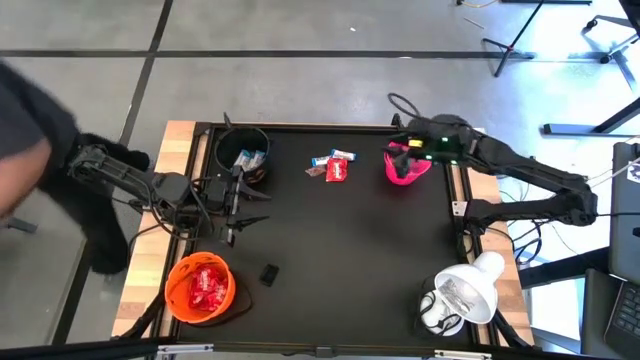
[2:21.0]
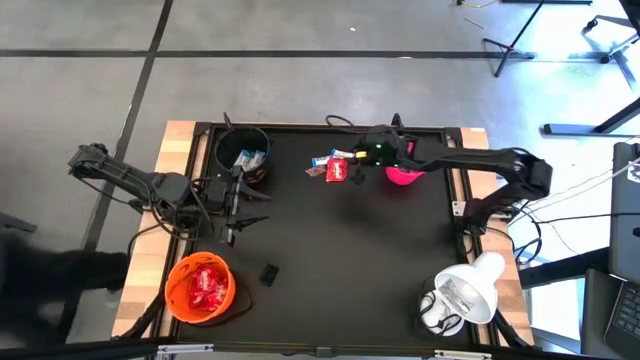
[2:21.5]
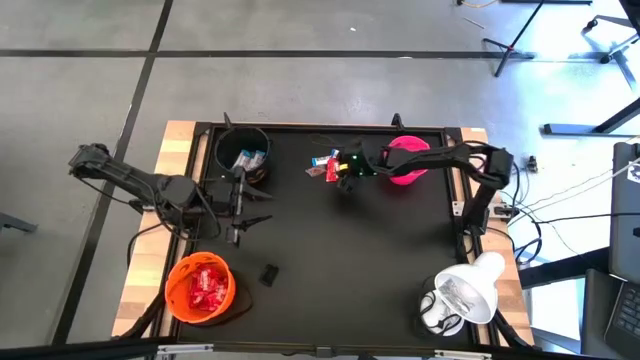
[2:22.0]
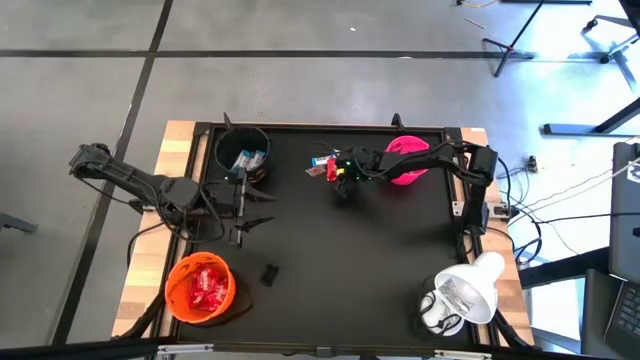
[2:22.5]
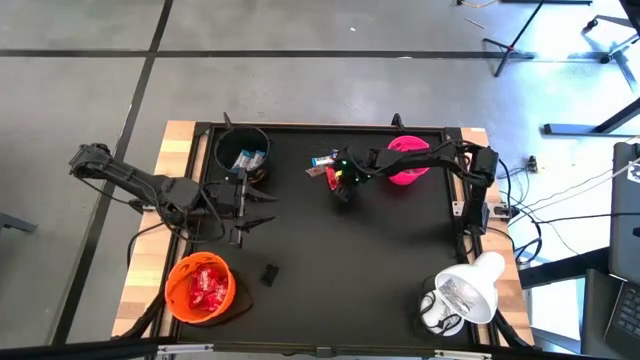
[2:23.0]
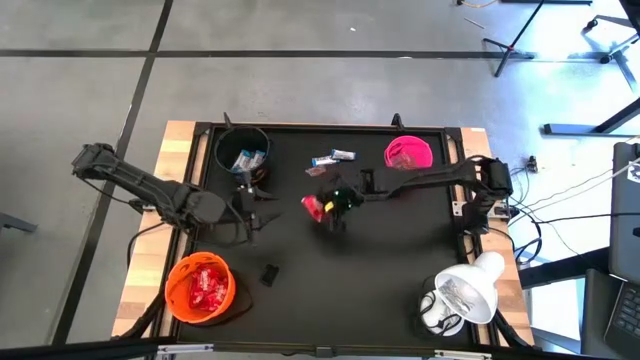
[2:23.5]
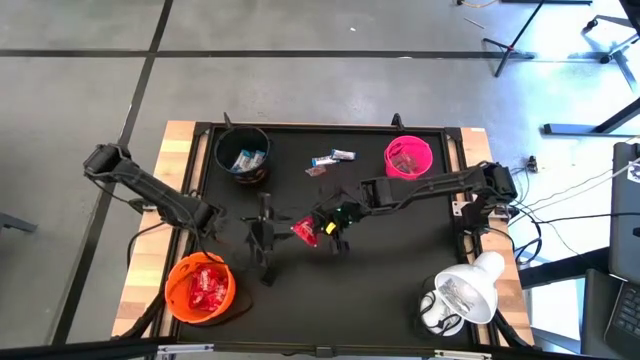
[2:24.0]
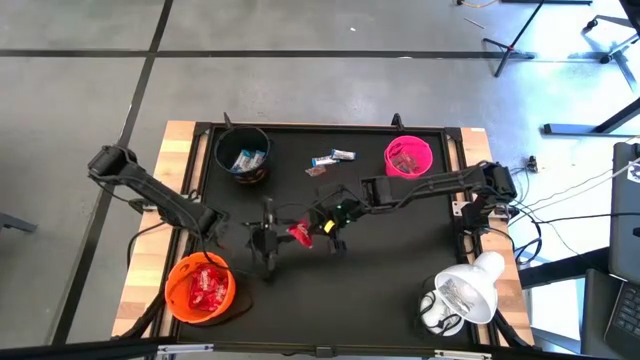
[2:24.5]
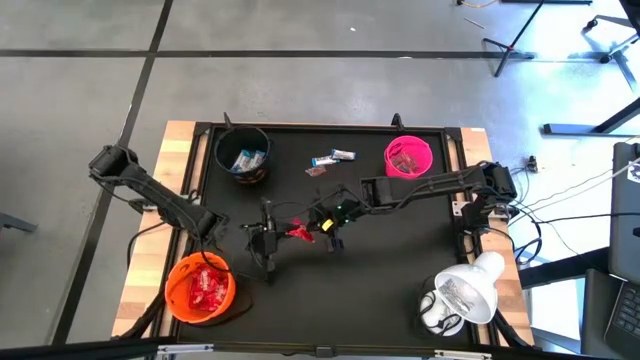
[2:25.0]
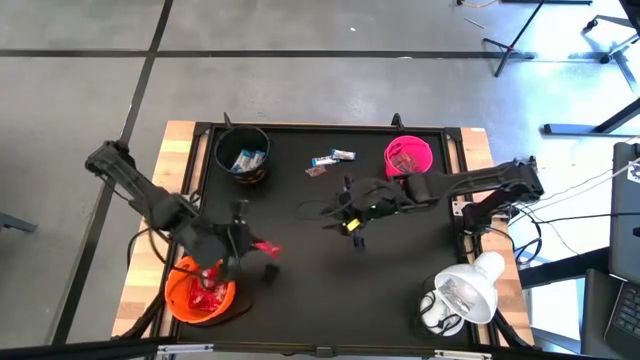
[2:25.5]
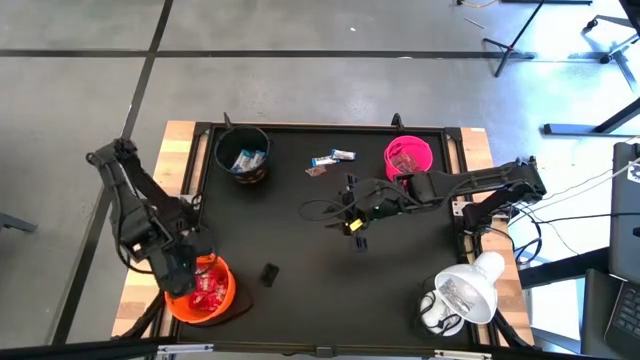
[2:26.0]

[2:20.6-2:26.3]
Task: Sort candy
Put the red candy into the orange bucket

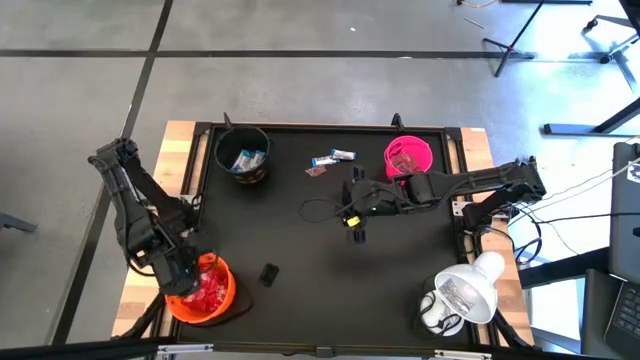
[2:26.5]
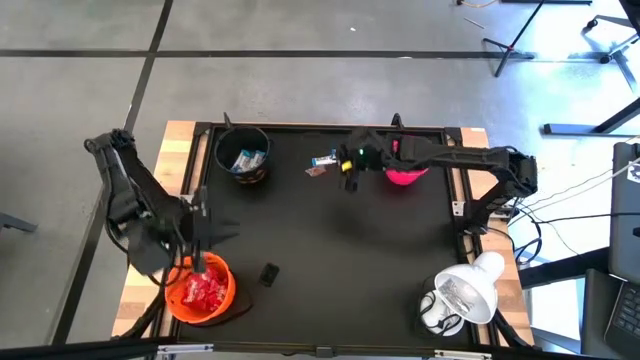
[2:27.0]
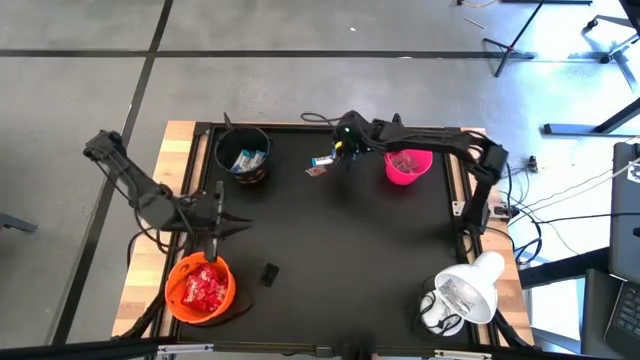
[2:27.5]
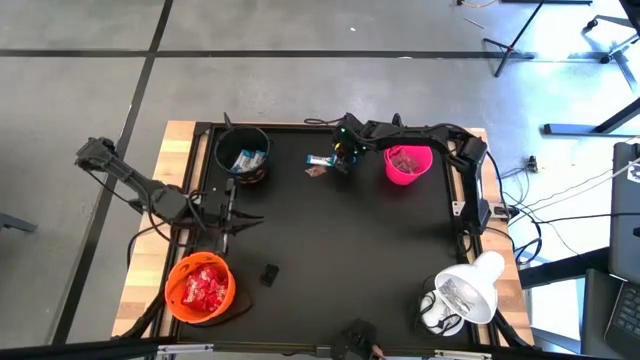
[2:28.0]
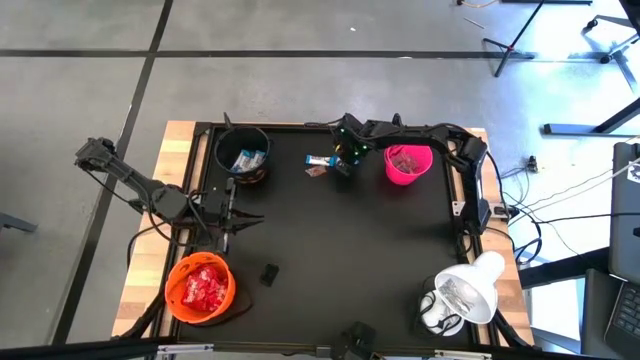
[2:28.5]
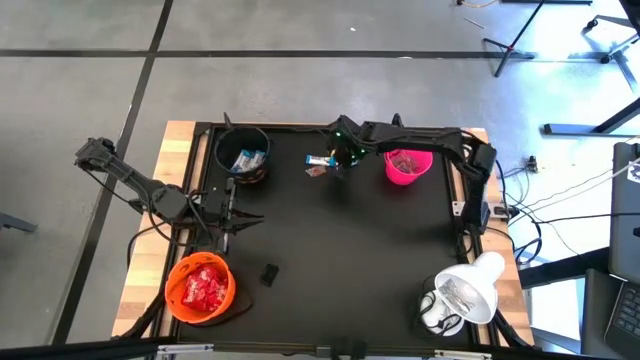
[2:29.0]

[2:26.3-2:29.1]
Put the white chocolate bar into the black bucket

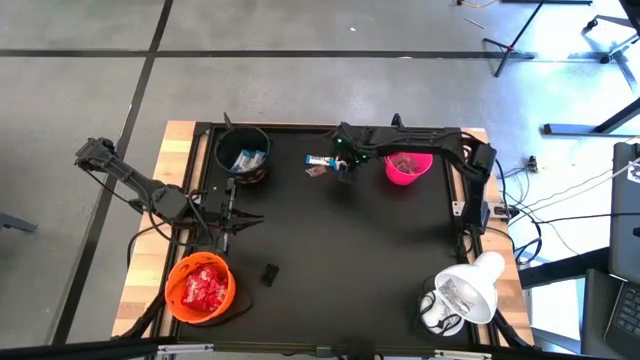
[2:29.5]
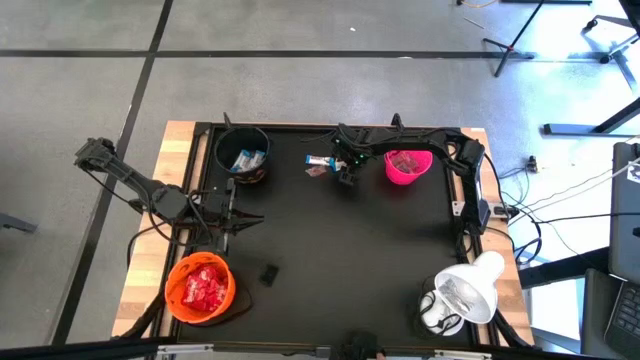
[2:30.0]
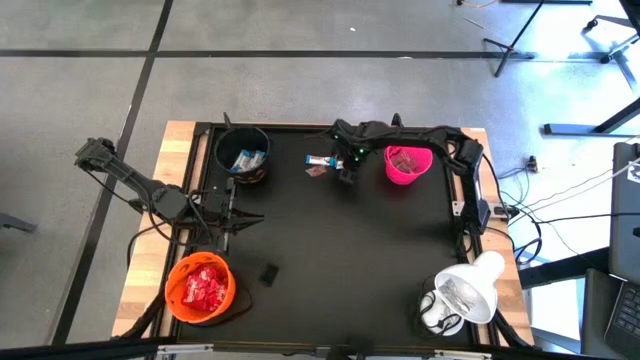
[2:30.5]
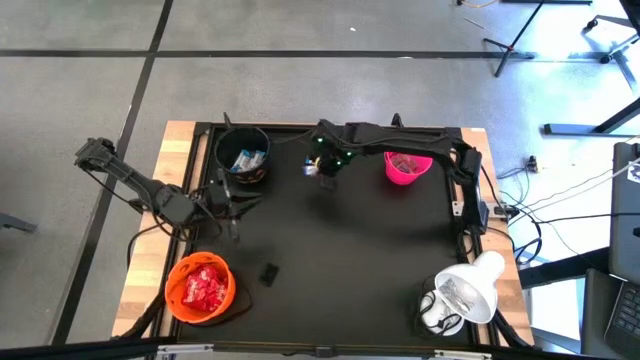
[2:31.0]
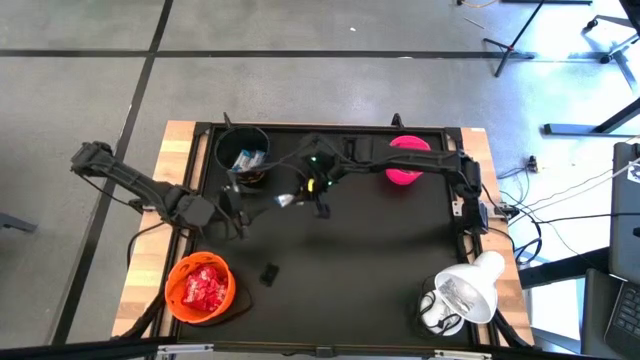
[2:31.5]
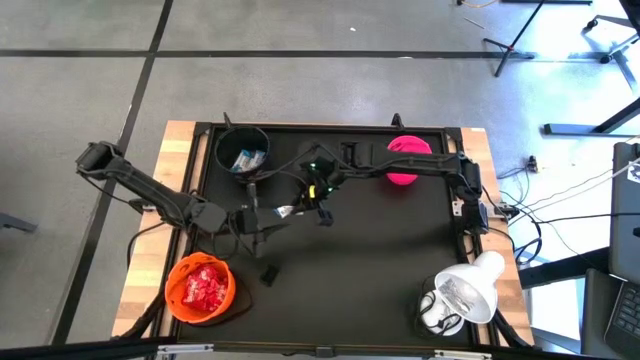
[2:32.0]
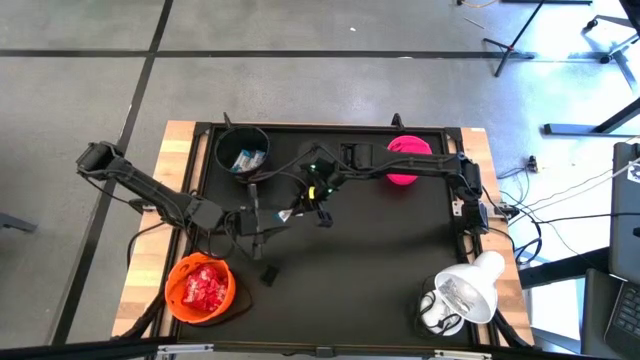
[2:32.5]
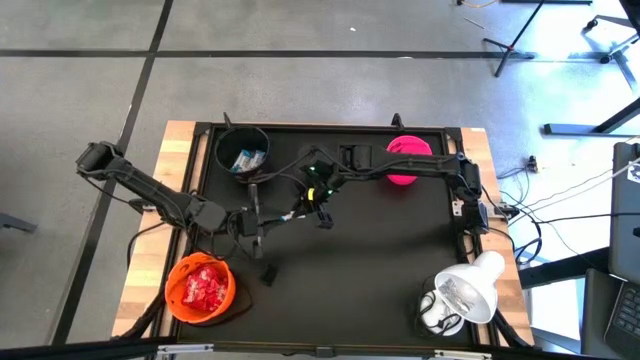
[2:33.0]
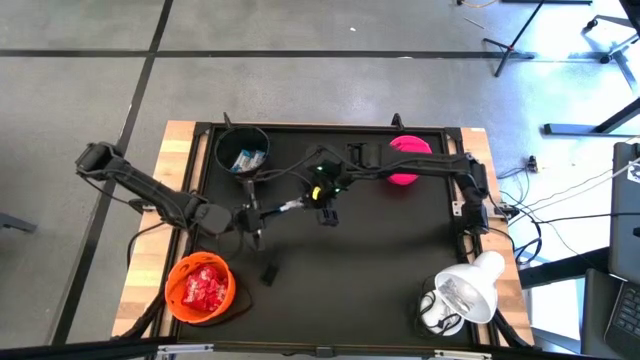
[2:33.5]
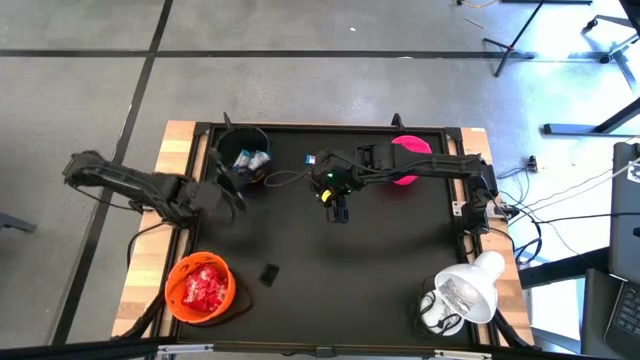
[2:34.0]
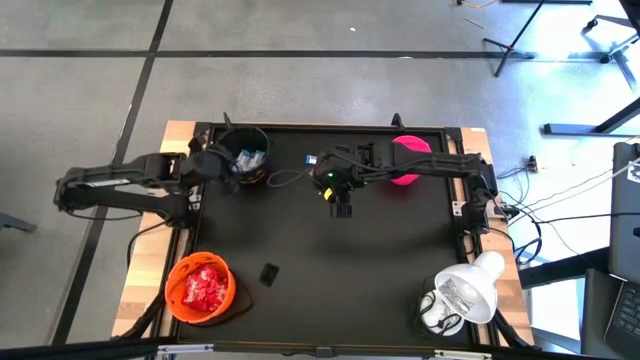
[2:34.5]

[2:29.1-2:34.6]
Put the white chocolate bar into the black bucket

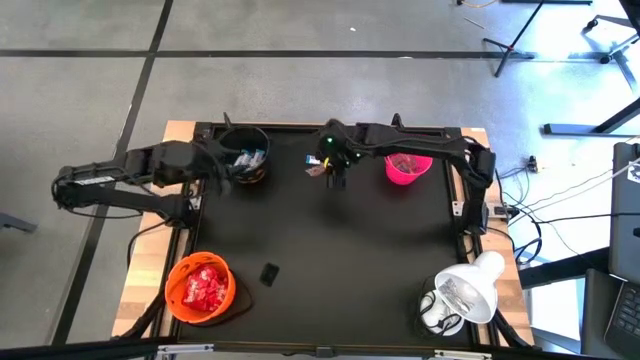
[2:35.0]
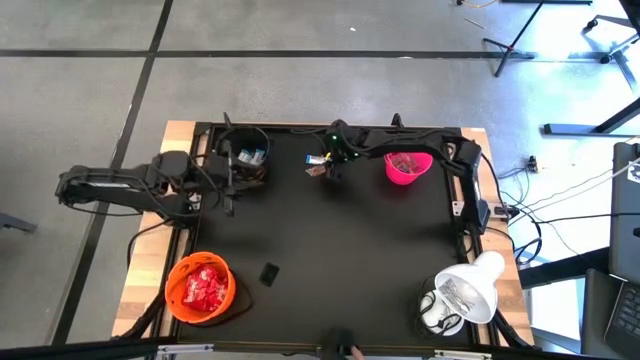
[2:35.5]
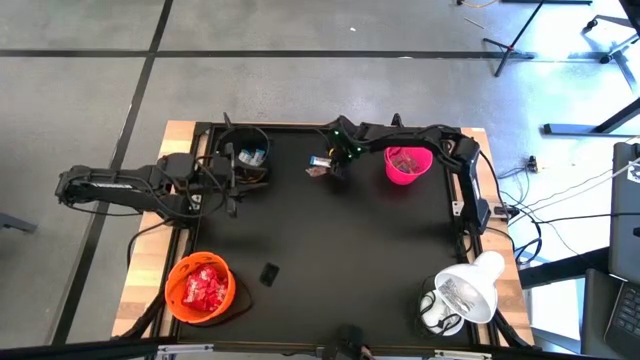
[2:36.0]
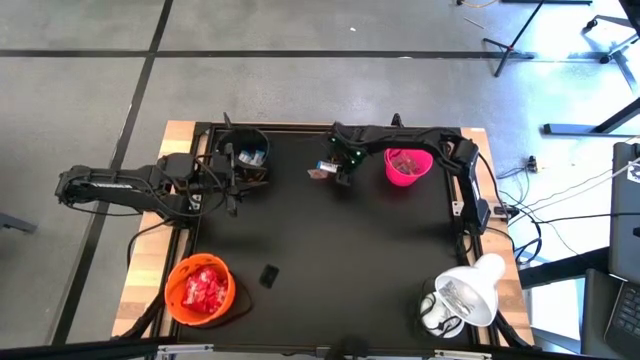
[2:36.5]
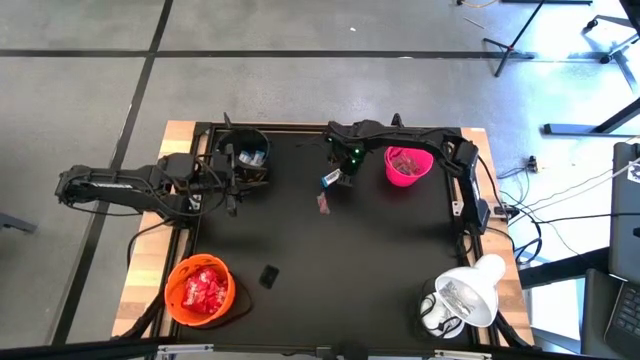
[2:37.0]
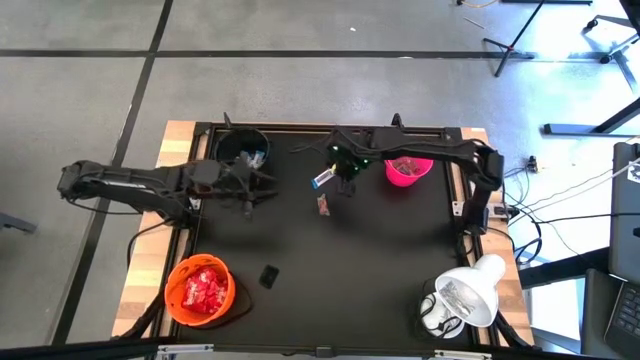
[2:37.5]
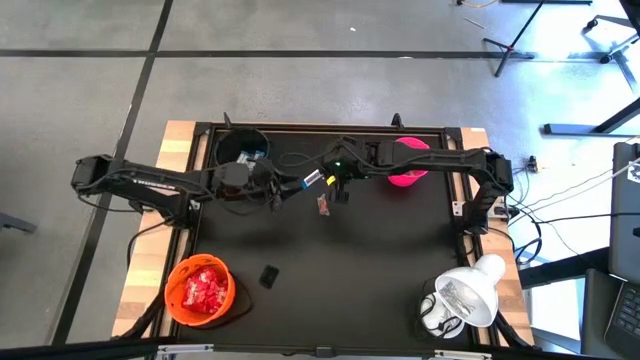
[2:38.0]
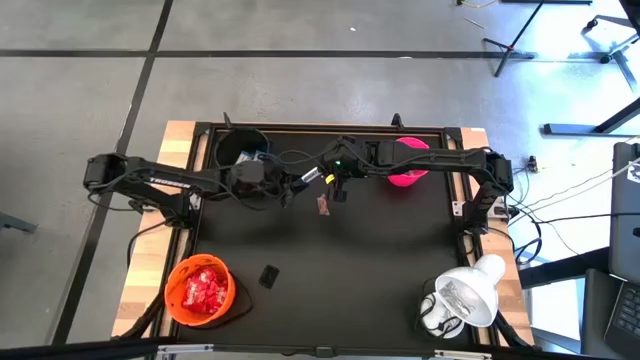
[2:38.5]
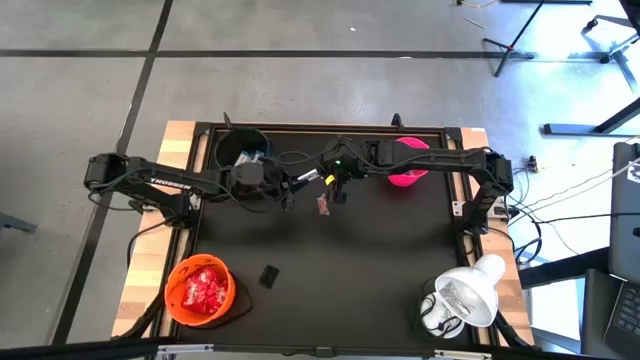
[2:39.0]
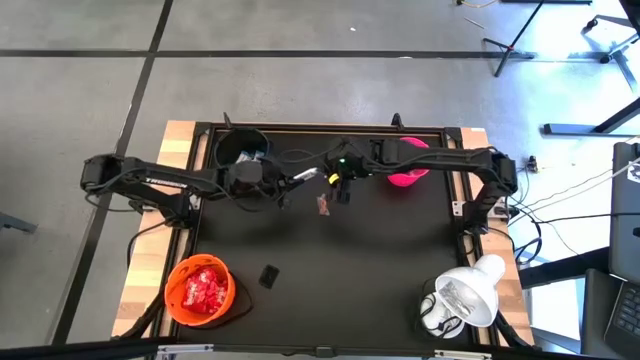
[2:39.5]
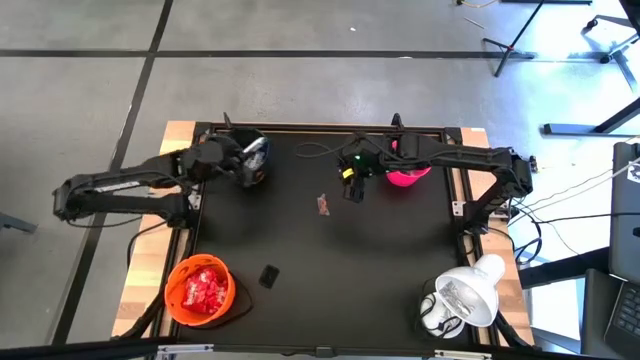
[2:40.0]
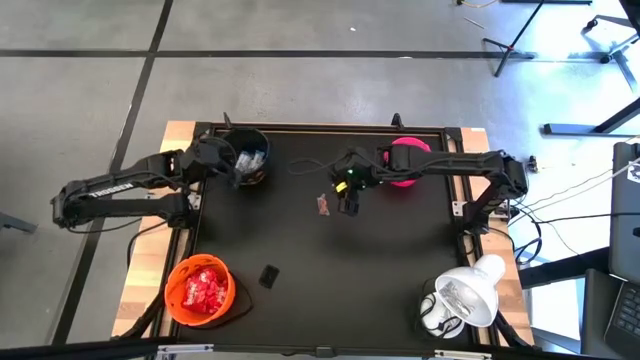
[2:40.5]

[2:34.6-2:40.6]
Put the white chocolate bar into the black bucket

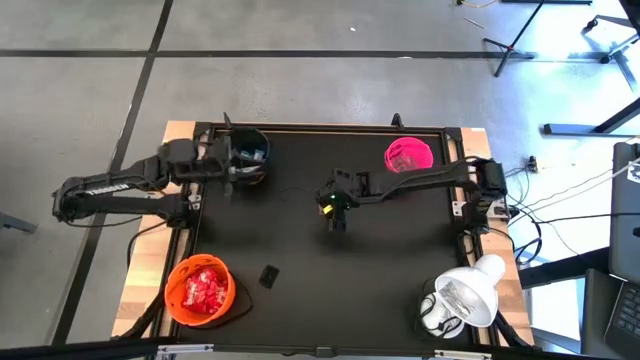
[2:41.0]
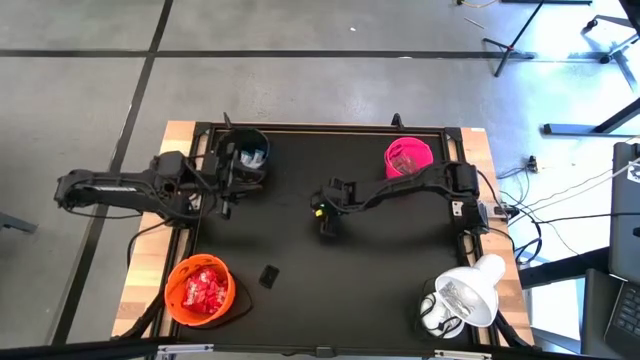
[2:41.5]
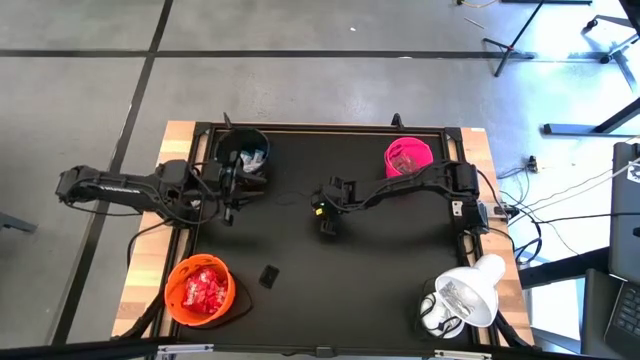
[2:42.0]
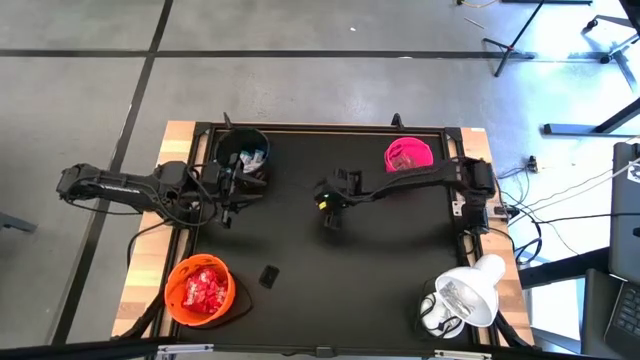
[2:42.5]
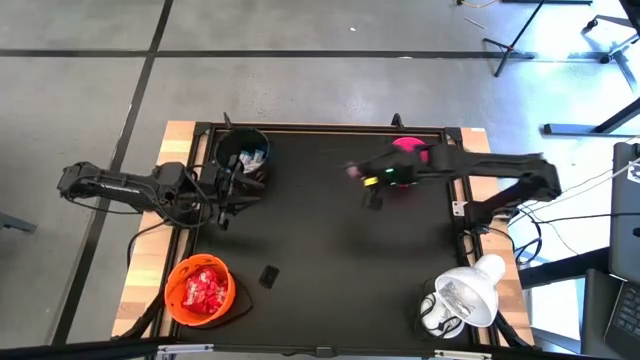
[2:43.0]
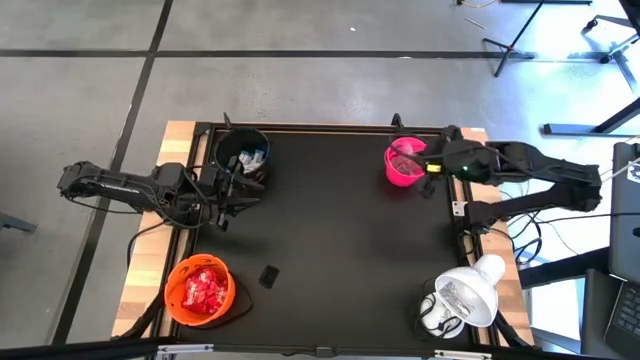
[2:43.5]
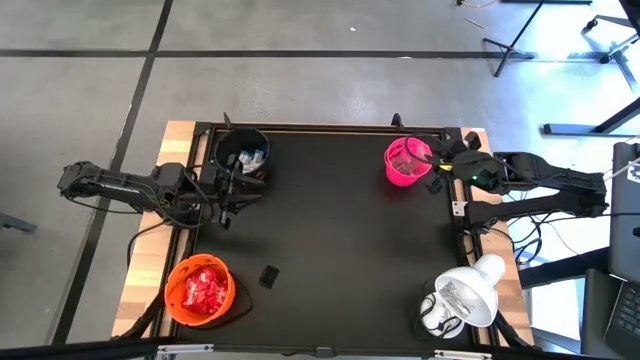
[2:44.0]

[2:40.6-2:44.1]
Put the orange gummy into the pink bucket
